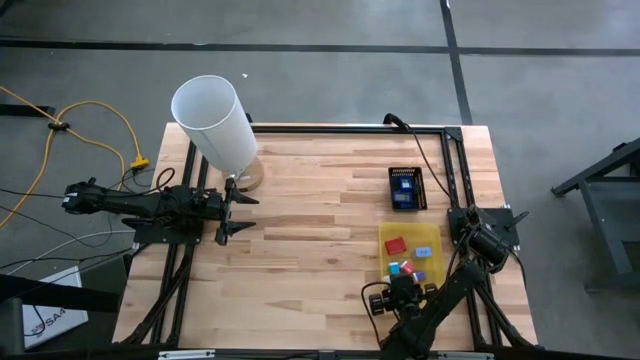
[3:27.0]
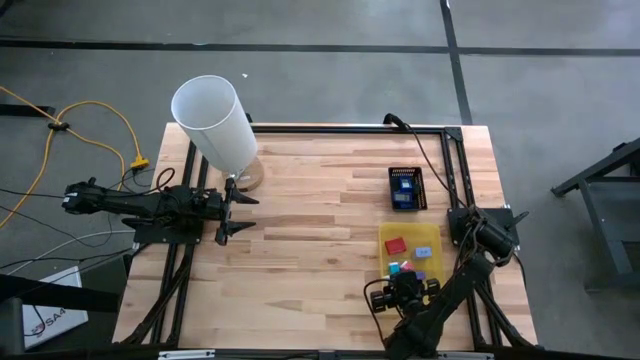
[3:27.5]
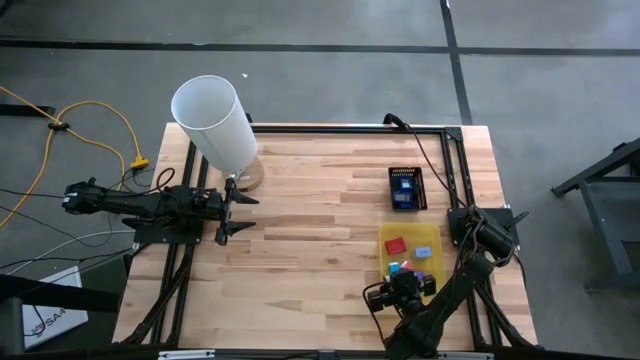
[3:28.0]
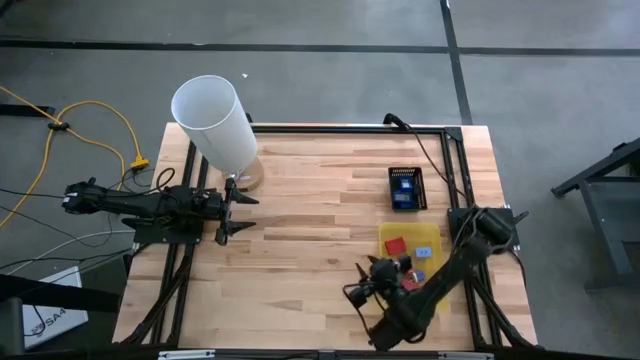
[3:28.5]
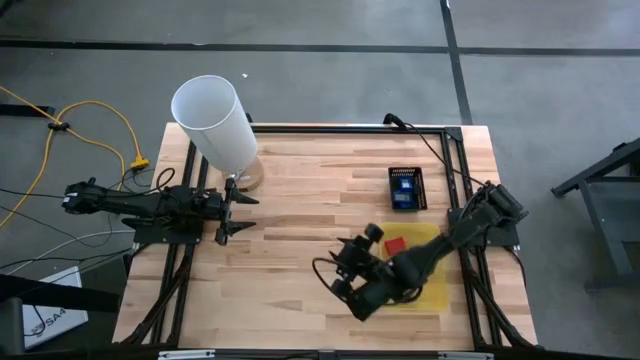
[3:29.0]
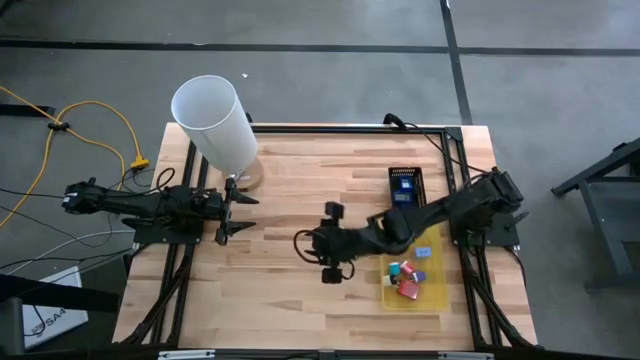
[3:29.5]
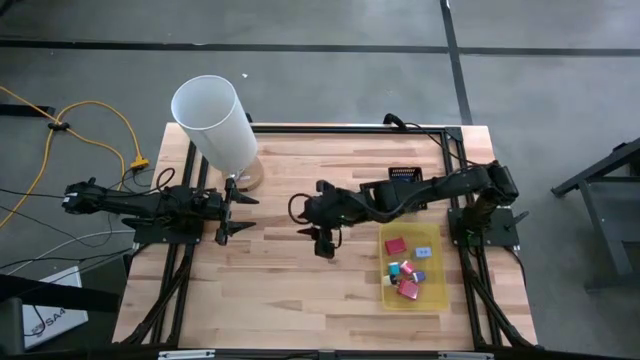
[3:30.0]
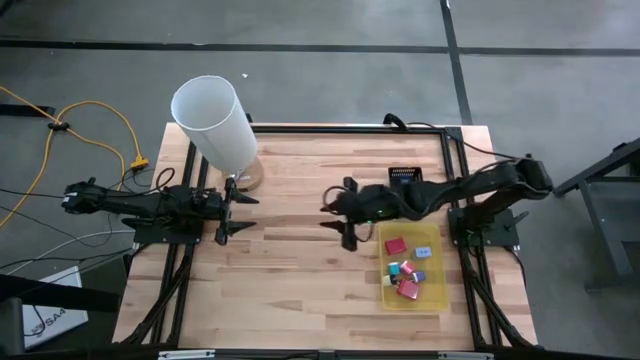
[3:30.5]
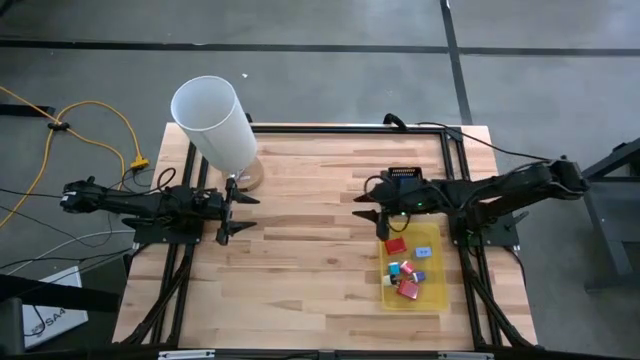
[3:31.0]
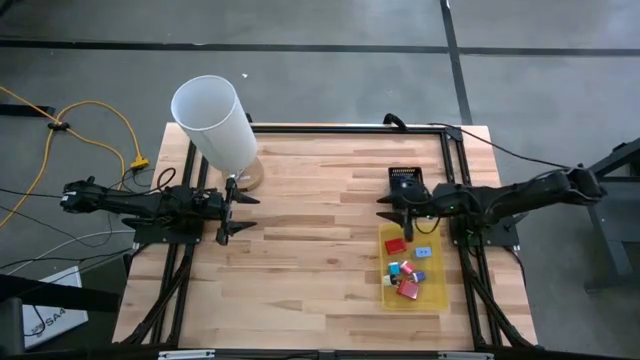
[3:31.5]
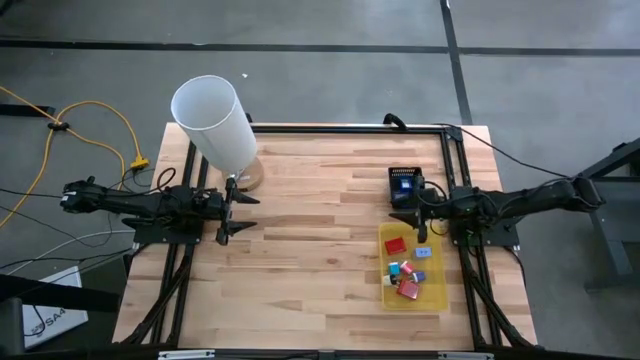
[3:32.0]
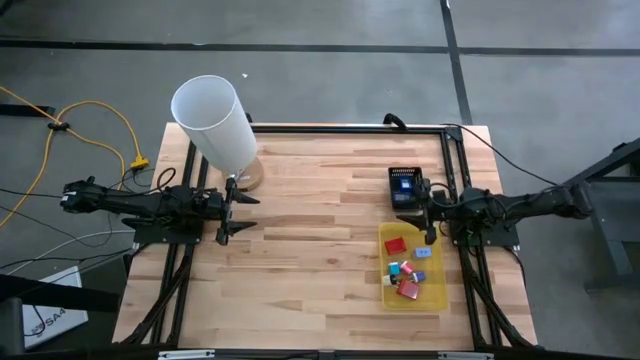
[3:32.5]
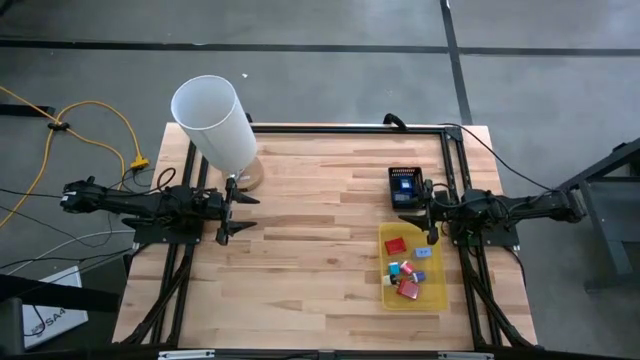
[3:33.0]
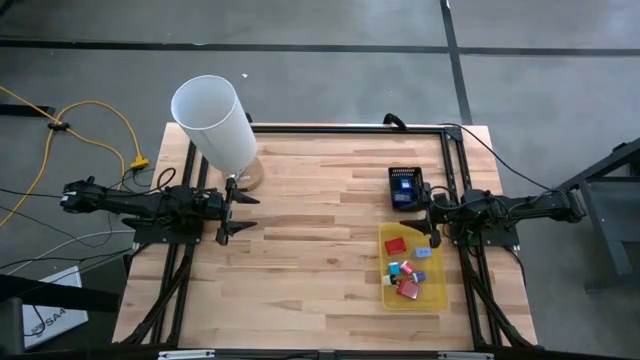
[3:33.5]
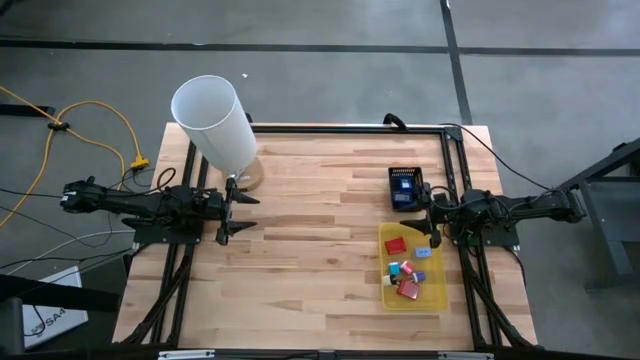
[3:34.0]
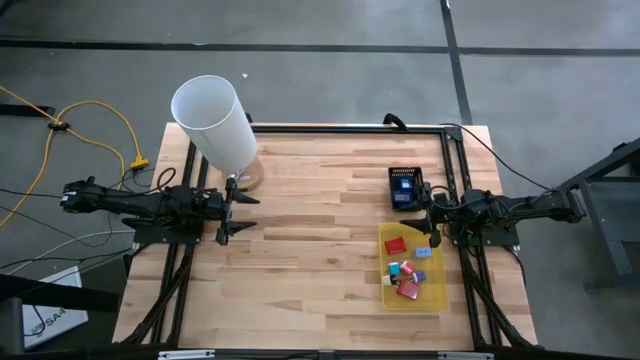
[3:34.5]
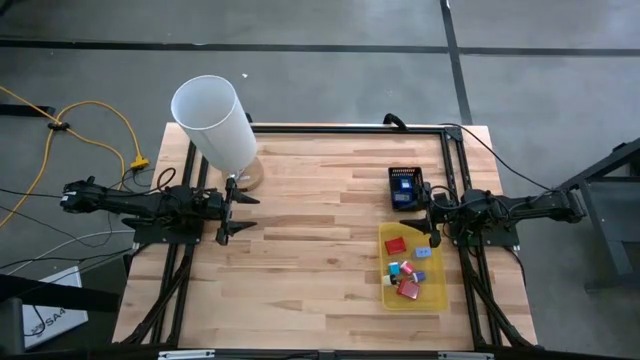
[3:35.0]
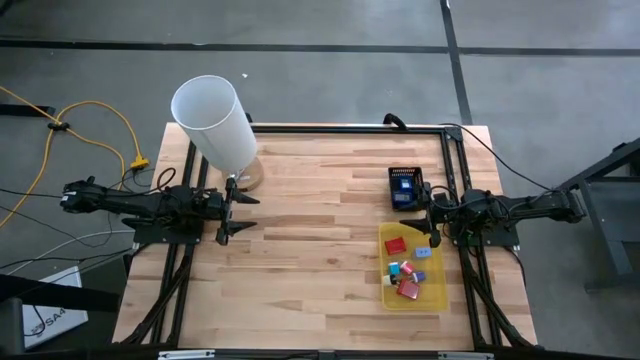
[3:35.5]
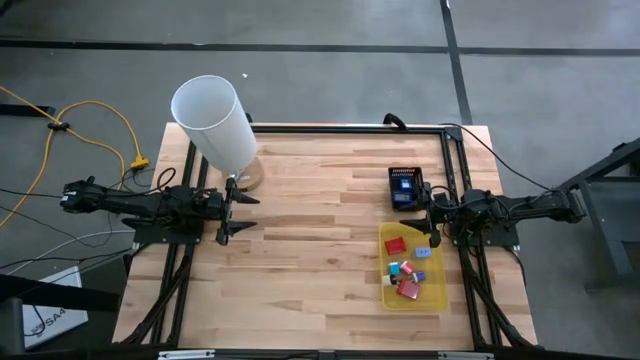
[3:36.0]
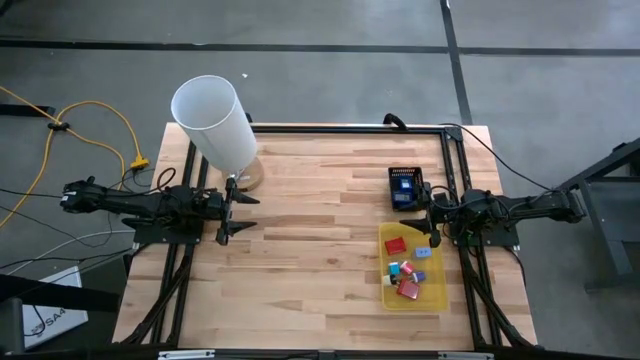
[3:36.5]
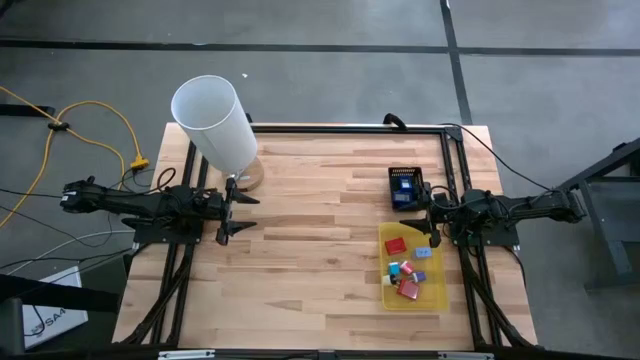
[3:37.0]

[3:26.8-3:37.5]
Task: Pick & Place Office items
Return to Home Position

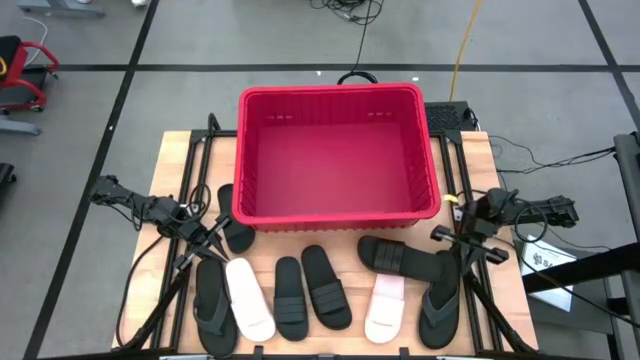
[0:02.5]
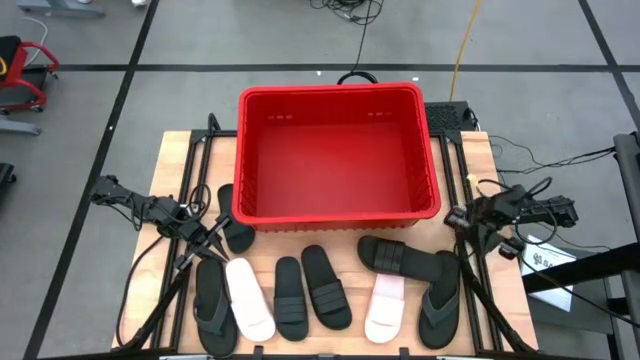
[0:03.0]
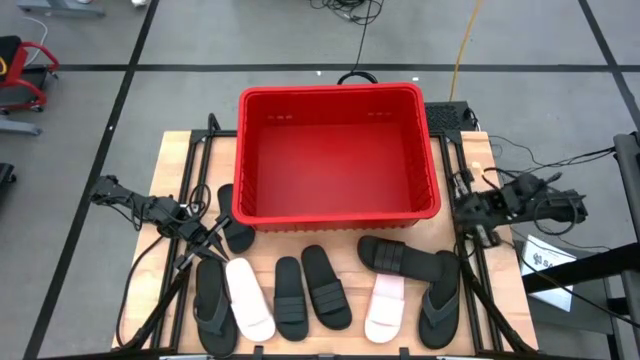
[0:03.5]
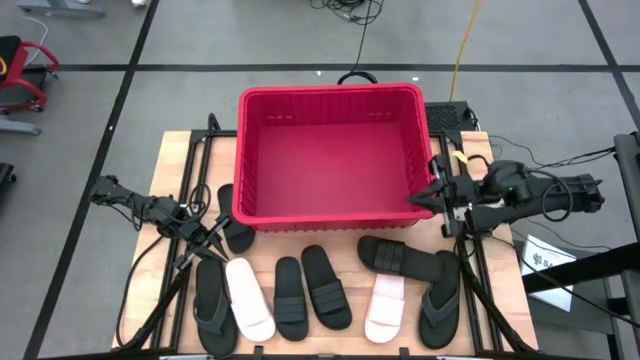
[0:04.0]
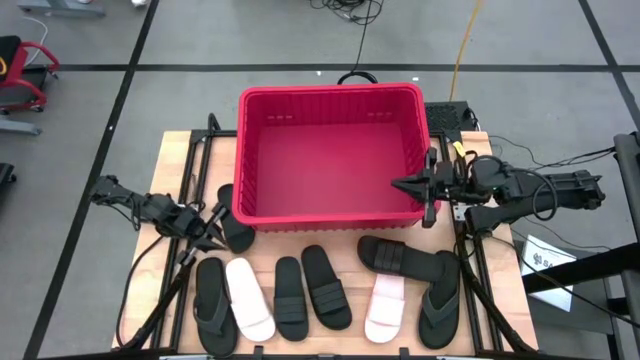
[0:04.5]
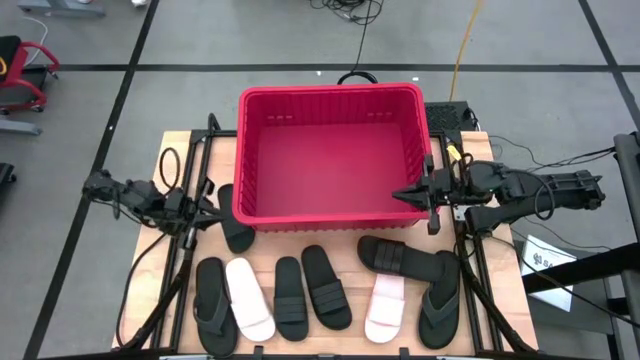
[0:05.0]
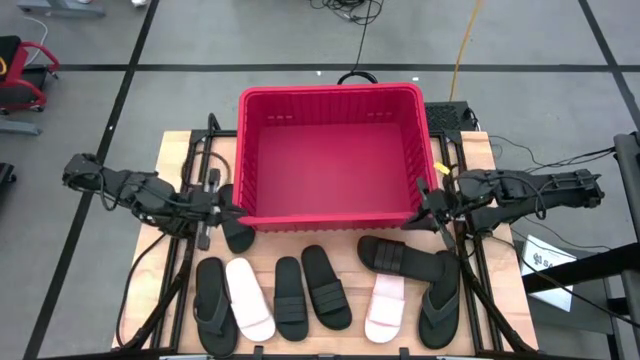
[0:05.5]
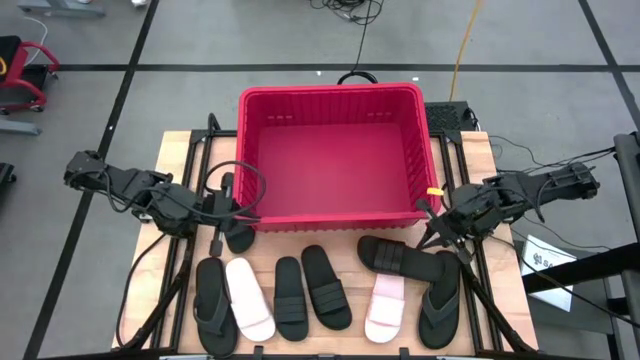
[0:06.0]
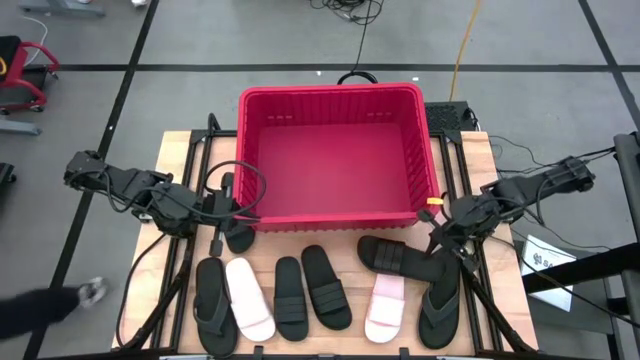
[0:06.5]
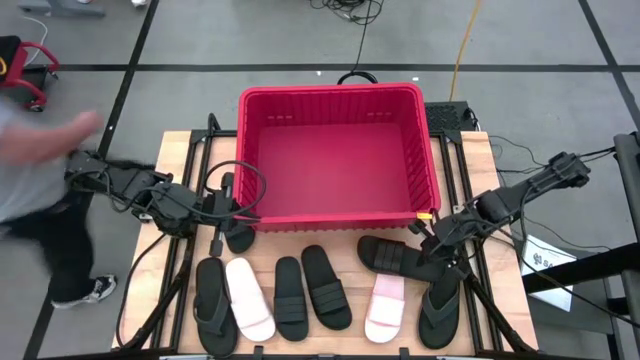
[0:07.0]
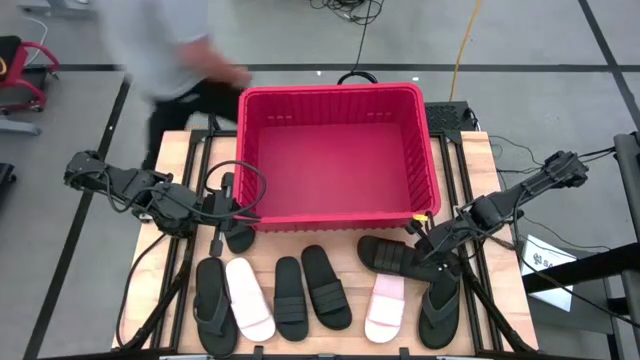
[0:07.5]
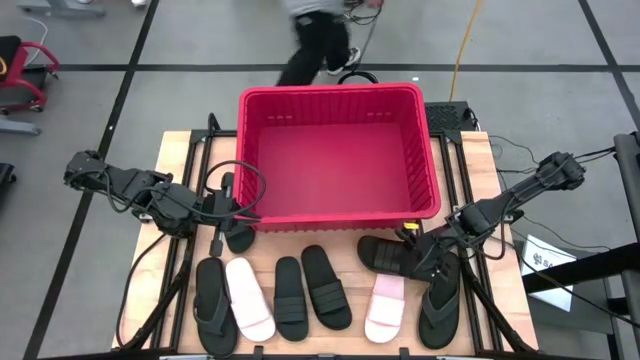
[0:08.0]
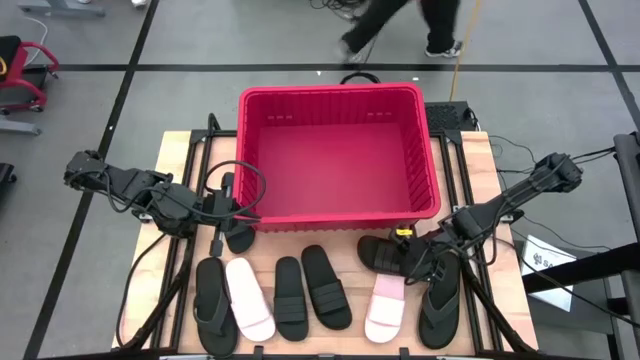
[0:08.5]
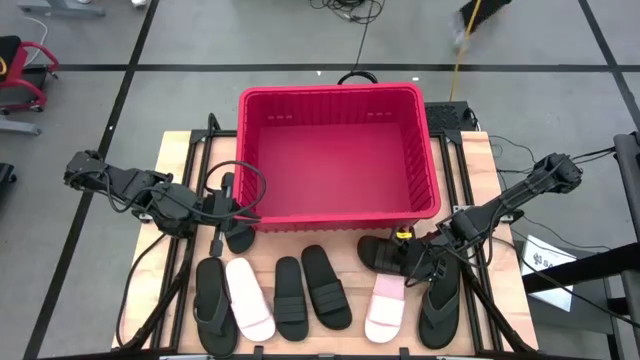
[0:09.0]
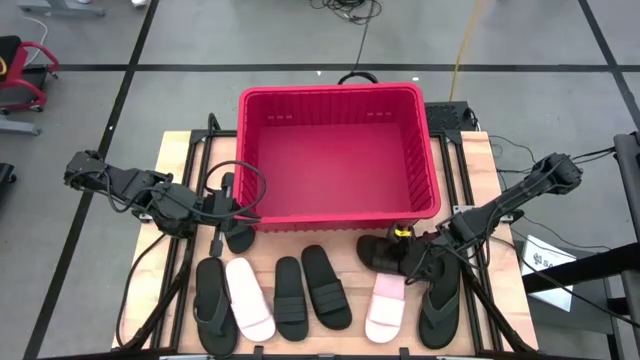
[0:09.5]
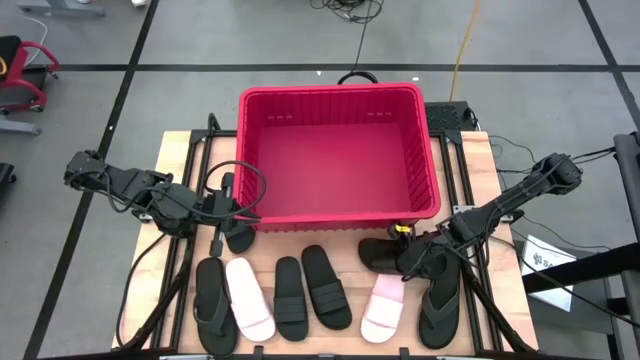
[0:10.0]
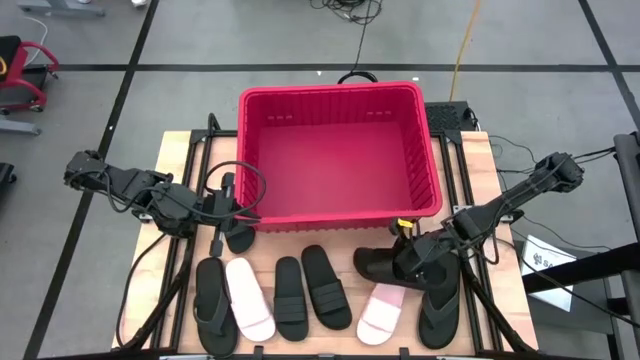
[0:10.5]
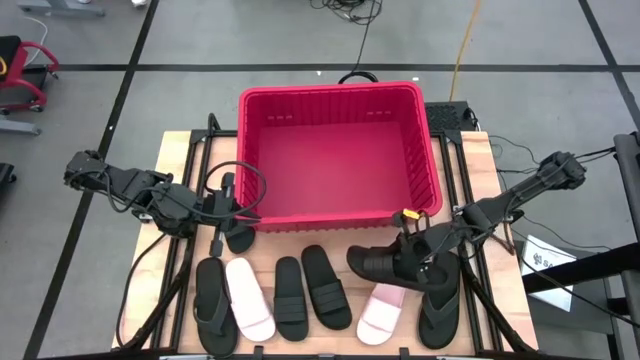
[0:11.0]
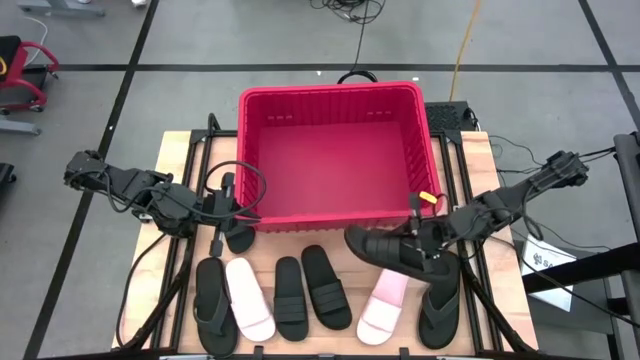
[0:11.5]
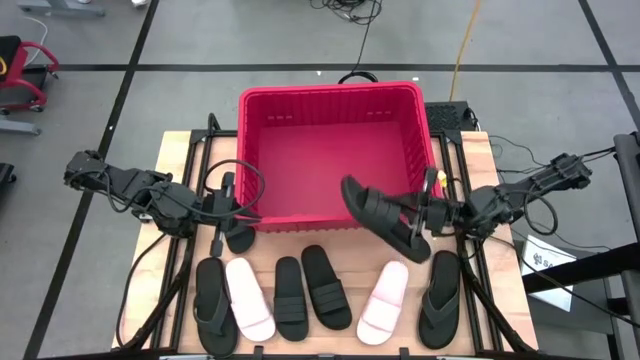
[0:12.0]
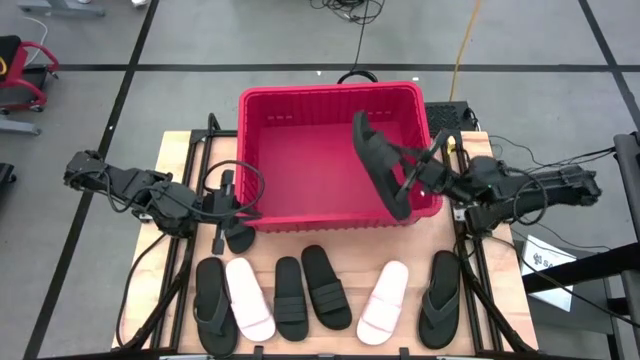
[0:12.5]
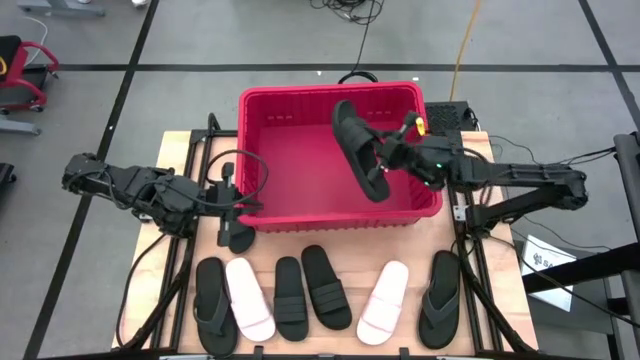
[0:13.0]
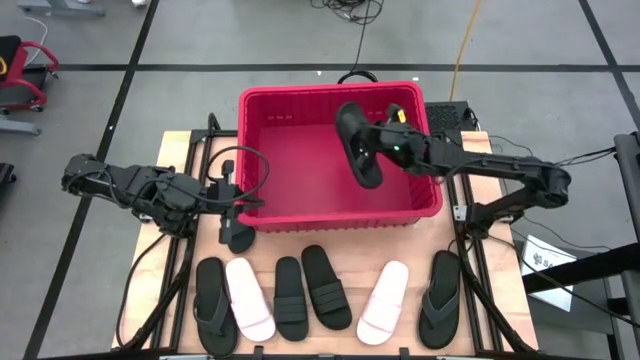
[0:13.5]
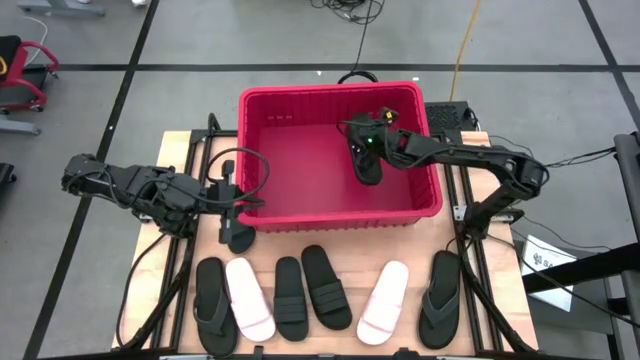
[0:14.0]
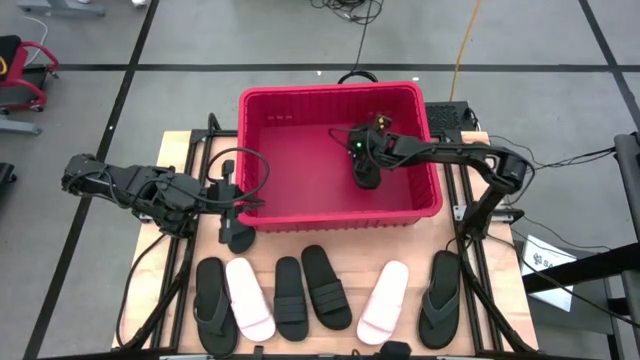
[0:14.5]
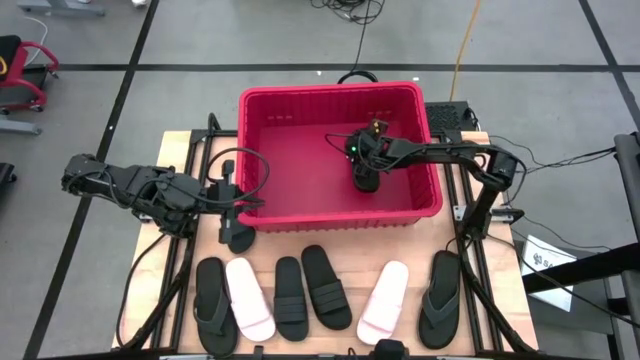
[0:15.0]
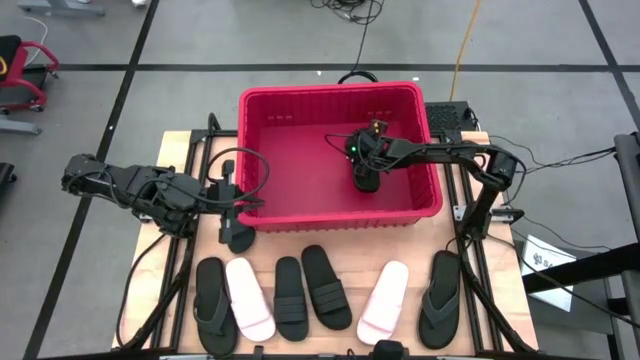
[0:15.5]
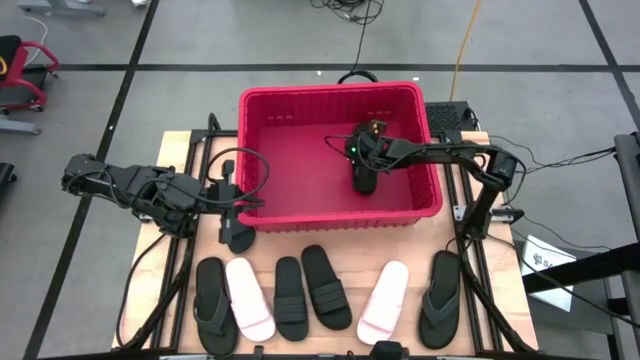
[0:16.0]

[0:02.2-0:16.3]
Task: Pick and place slides into bin
Put the black slide into the red bin
